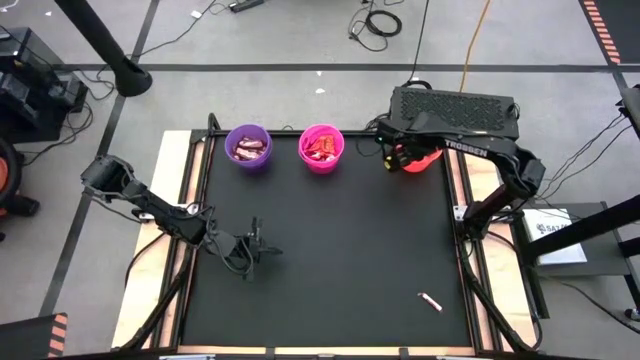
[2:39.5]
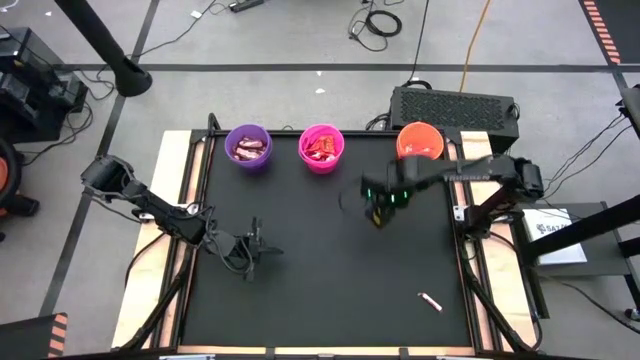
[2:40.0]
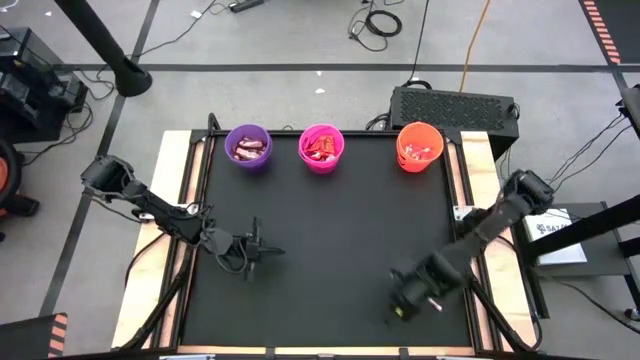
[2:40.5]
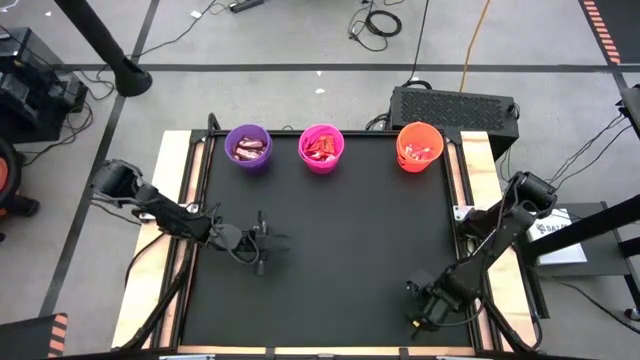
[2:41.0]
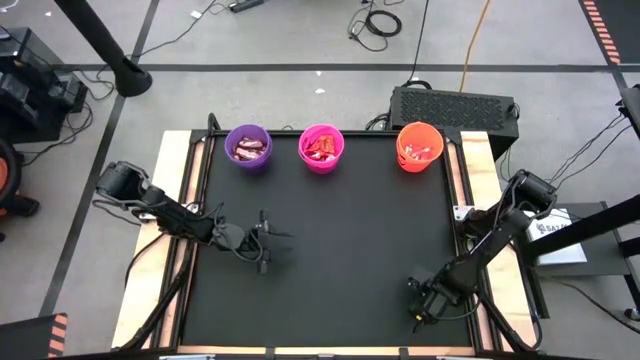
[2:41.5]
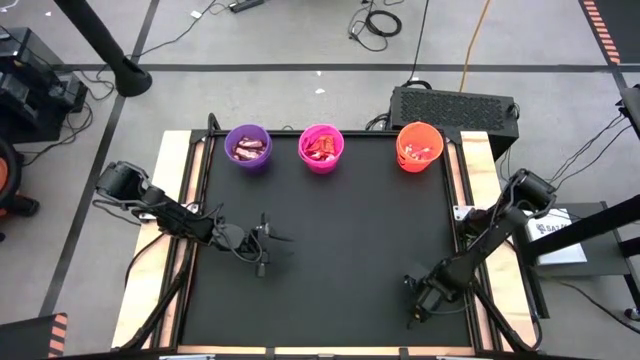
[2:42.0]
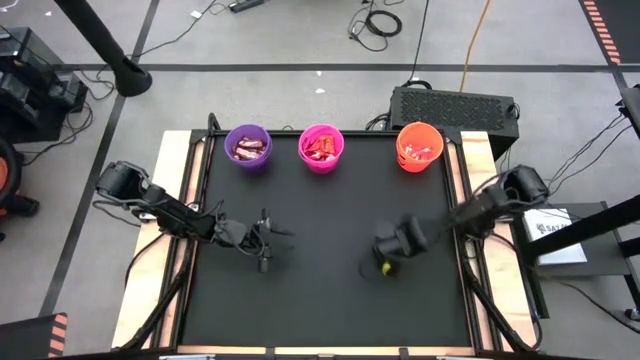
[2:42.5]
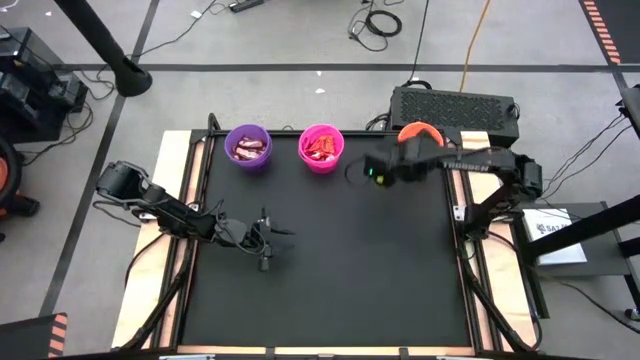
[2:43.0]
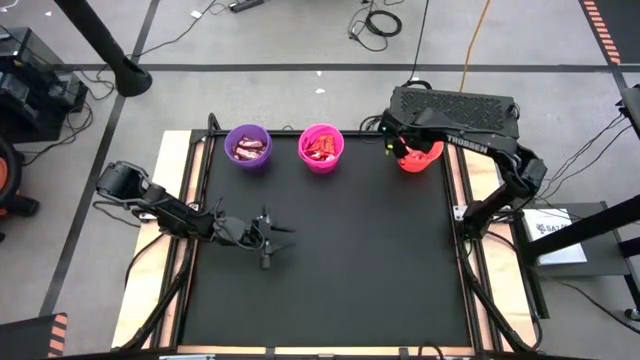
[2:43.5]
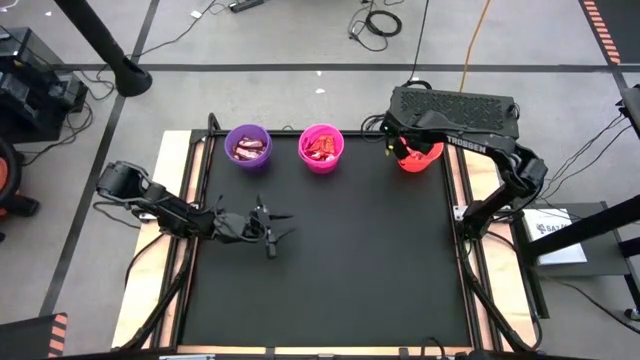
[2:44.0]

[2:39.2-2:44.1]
Task: Sort candy by brand, put in halloween buckets
Put the white candy into the orange bucket

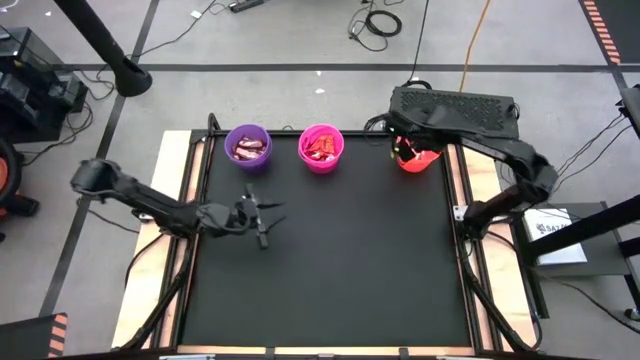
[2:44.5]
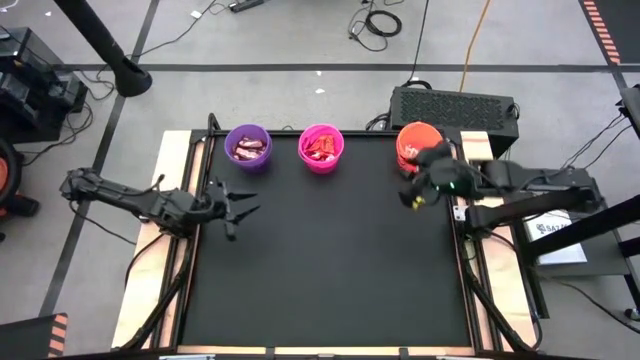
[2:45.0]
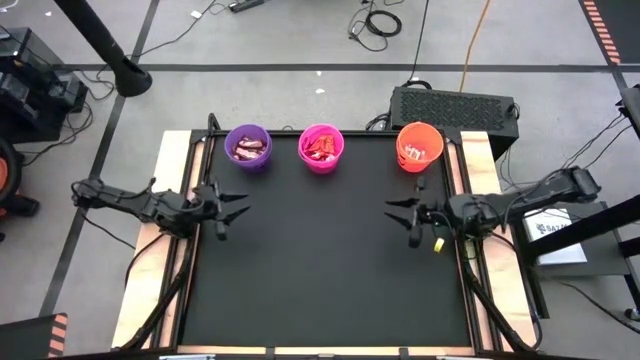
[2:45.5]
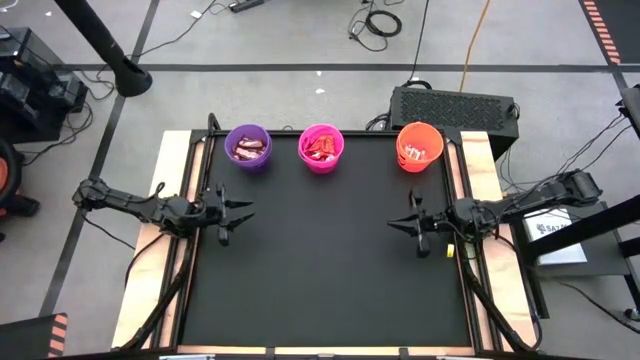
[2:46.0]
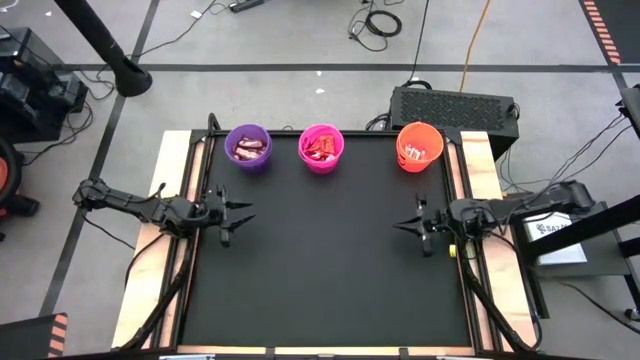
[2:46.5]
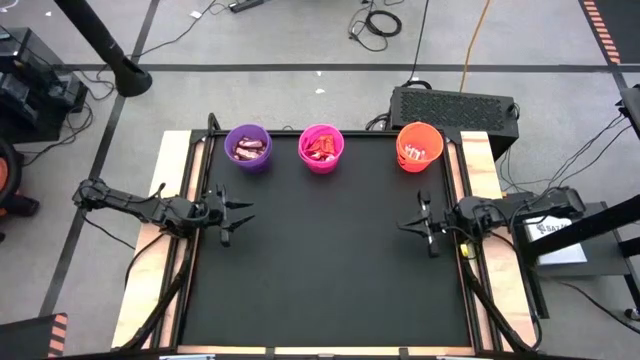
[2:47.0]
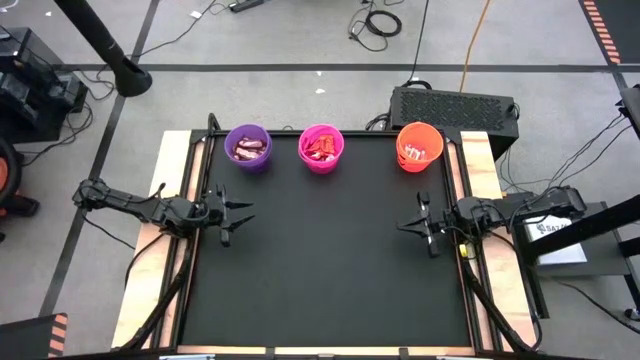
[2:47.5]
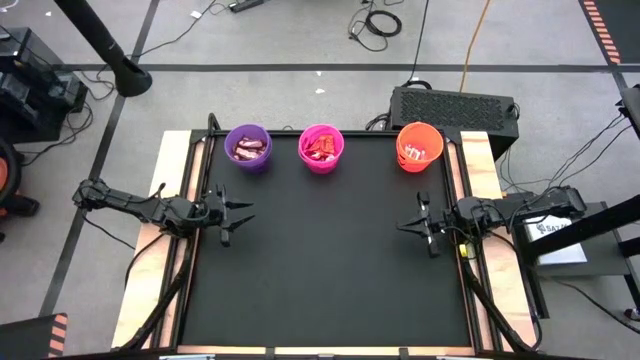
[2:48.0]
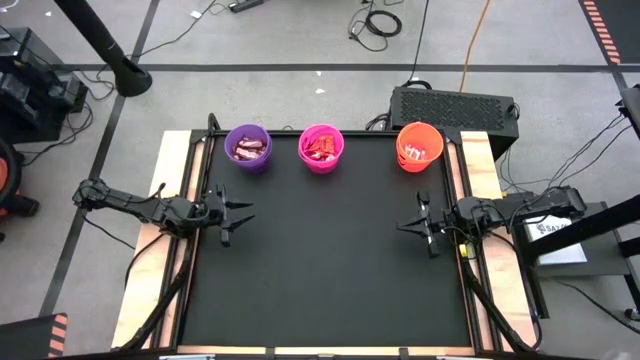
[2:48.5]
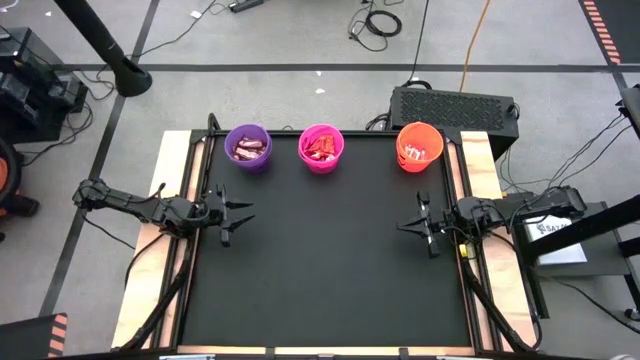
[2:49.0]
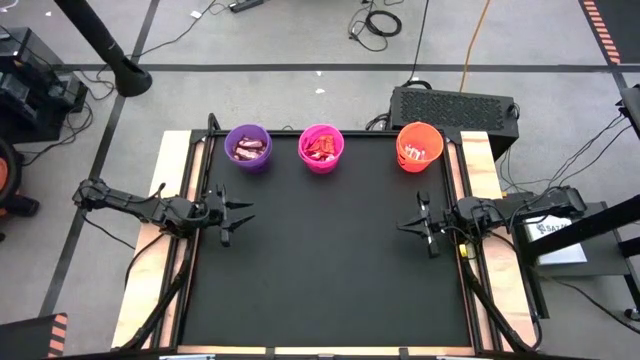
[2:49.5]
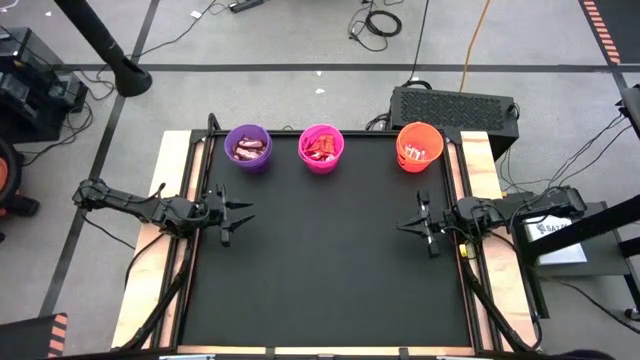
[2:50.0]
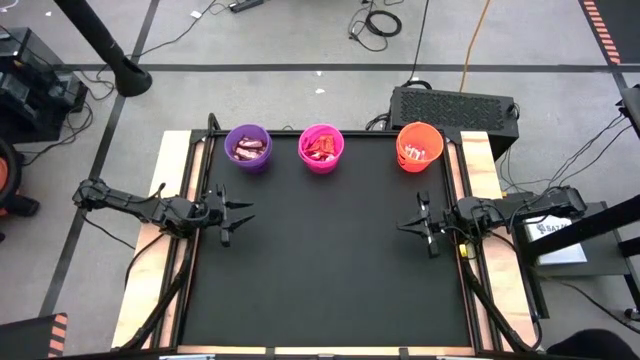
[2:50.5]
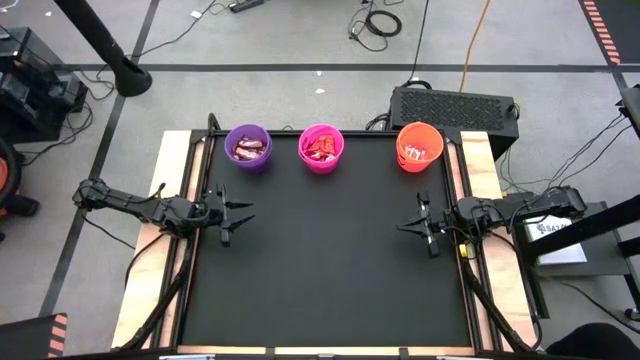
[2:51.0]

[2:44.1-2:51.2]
Return to Home Position

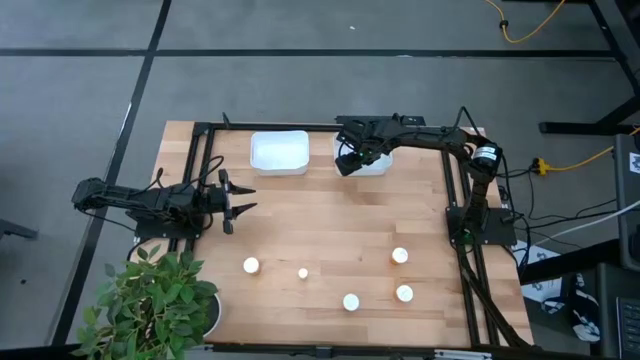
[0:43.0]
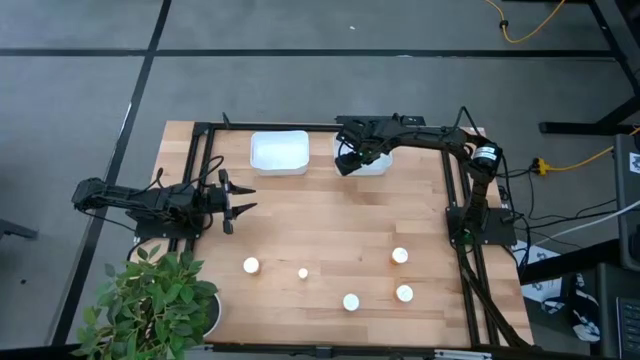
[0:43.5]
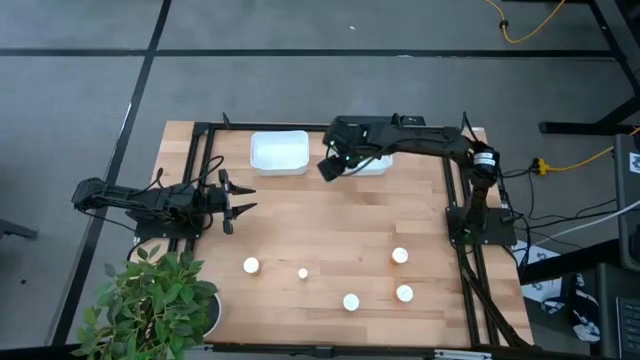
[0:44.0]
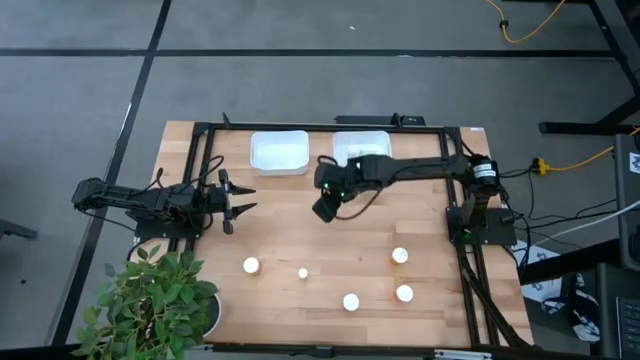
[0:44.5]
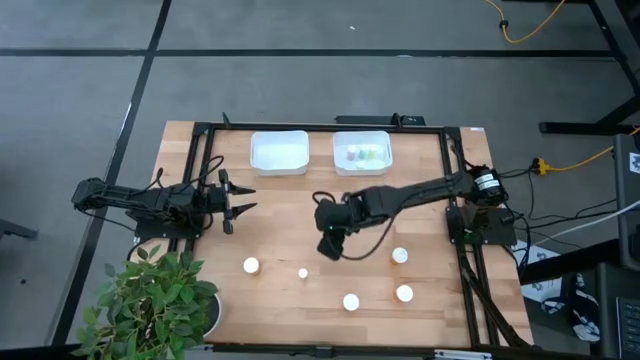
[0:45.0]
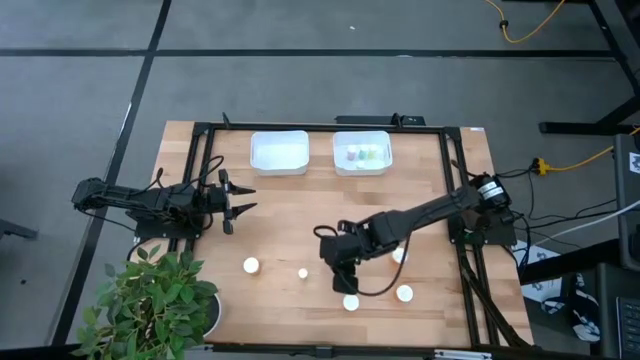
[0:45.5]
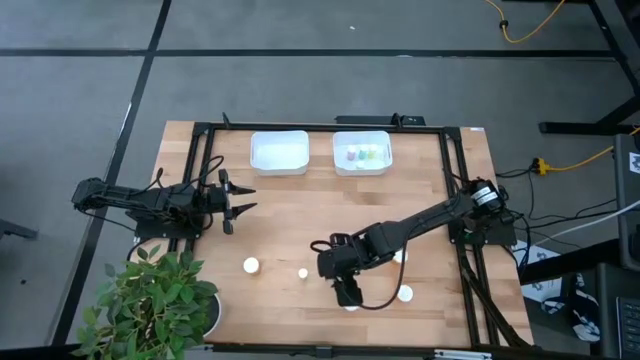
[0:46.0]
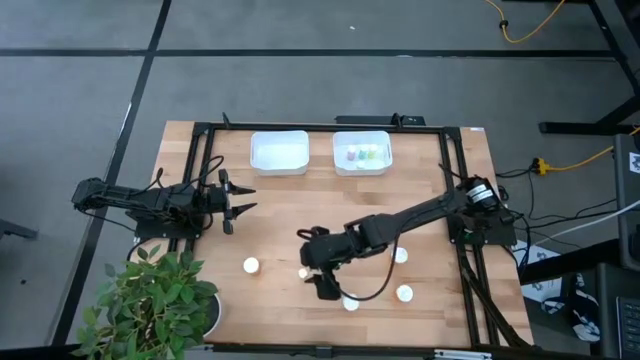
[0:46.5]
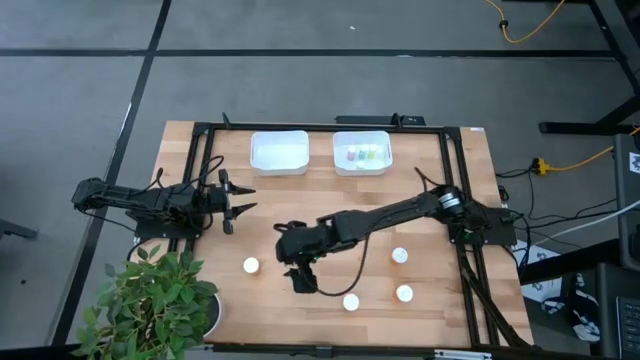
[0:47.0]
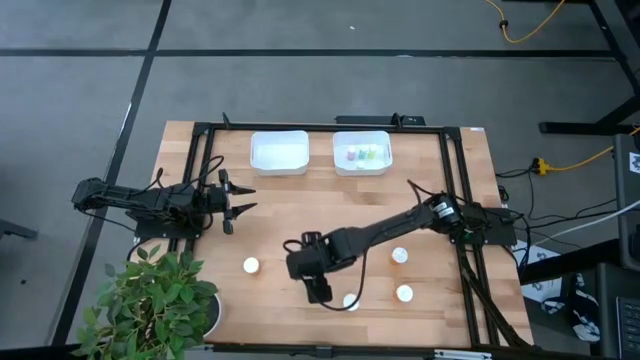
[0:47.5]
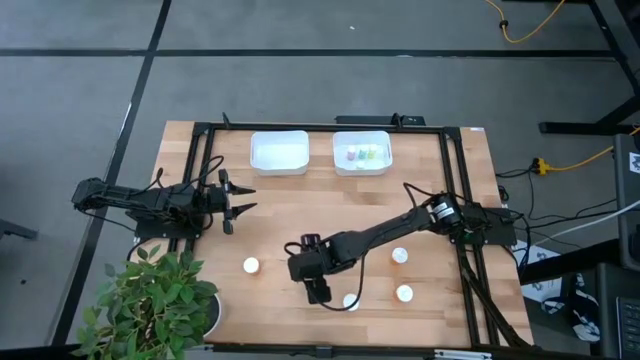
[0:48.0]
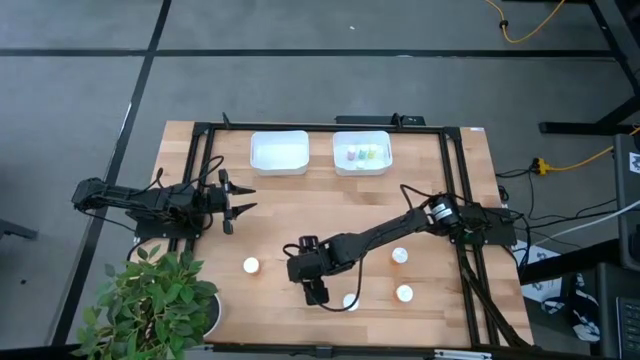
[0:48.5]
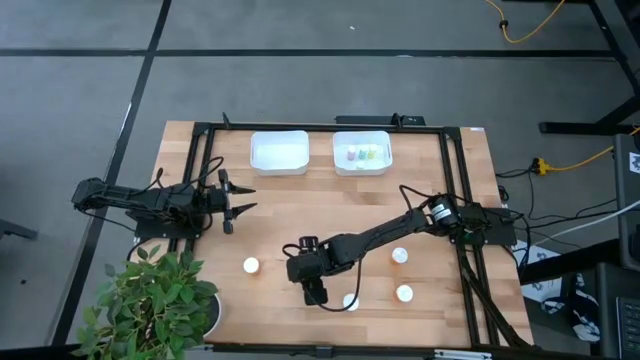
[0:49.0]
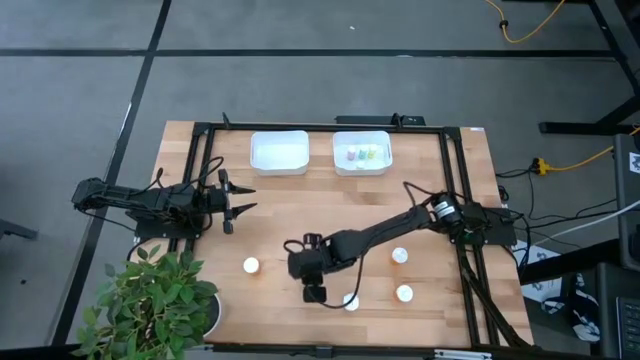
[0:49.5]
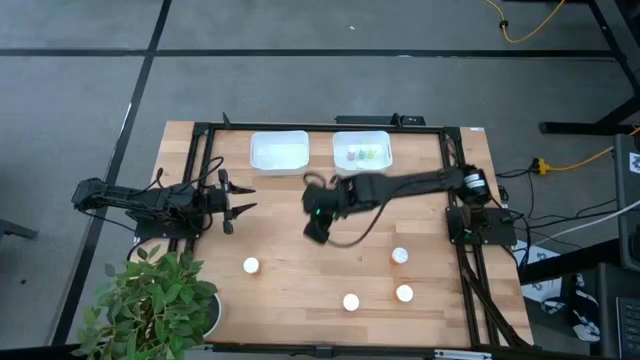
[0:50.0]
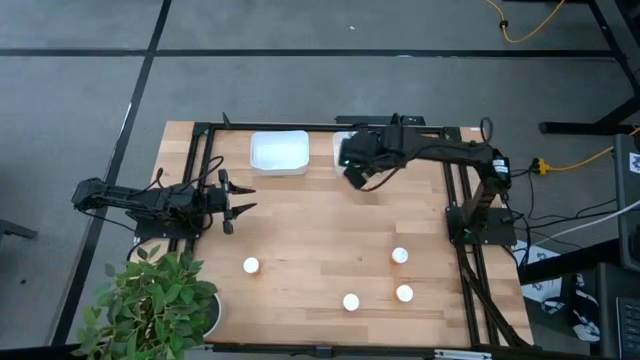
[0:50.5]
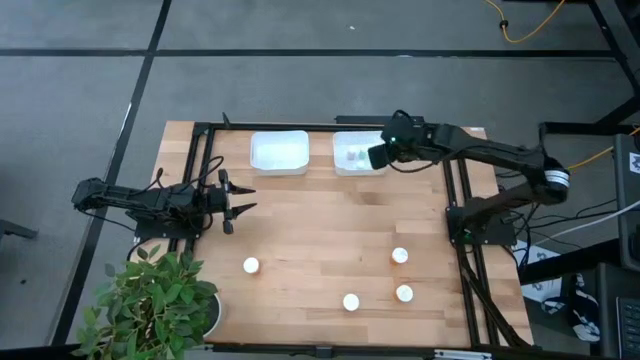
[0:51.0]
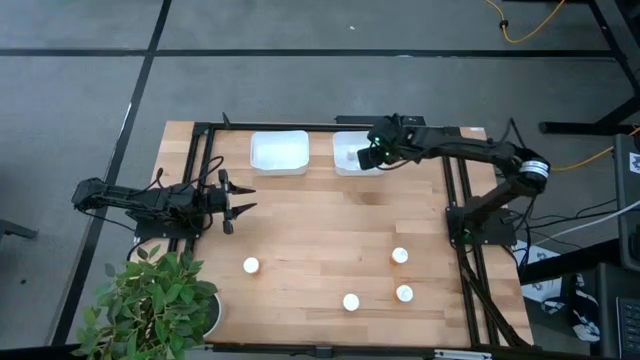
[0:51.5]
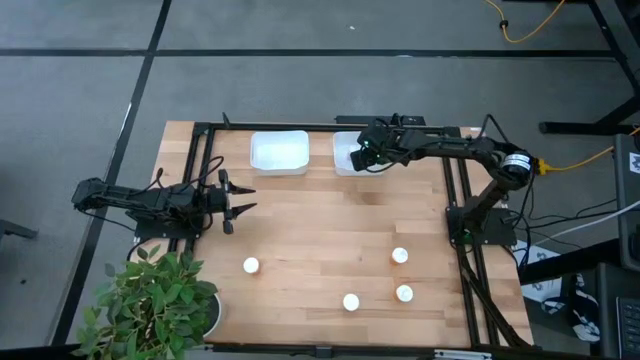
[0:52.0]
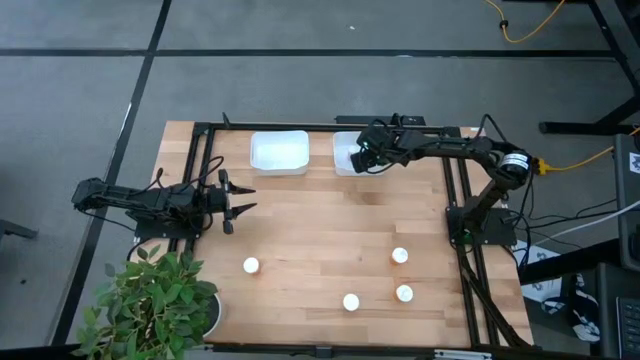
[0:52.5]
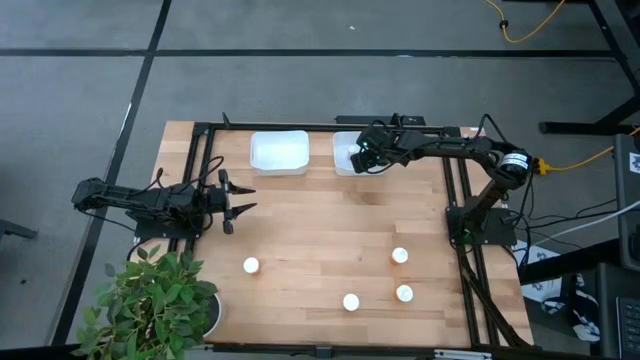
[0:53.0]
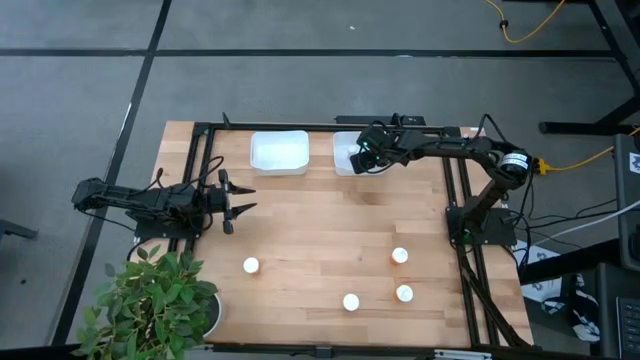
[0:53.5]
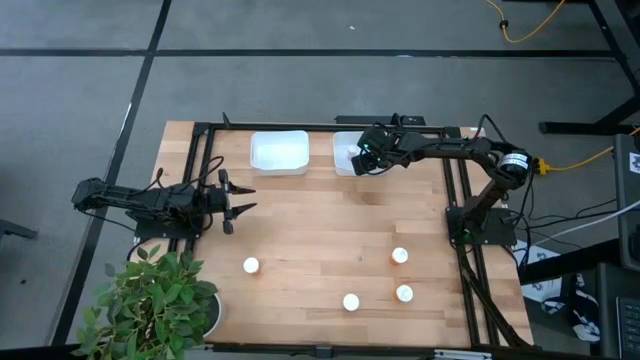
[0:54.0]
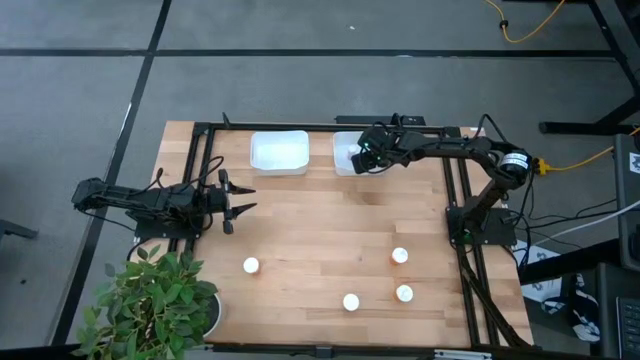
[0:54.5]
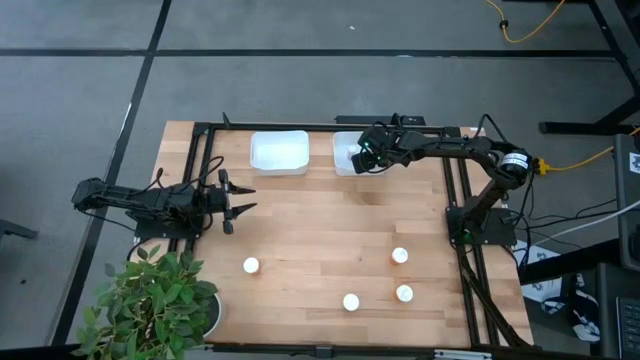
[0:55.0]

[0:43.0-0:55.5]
Task: Pick and place medicine bottles into bin by pill shape (circle, oval)
Put the yellow pill bottle into the right white bin
